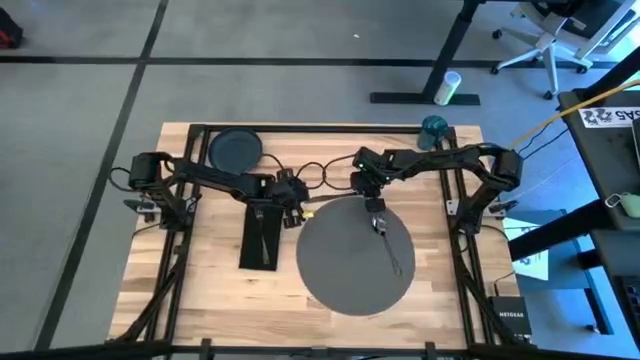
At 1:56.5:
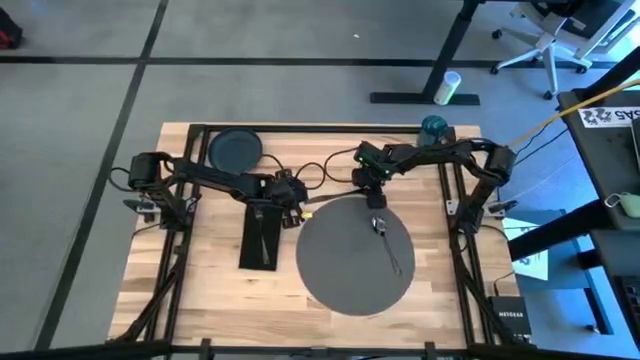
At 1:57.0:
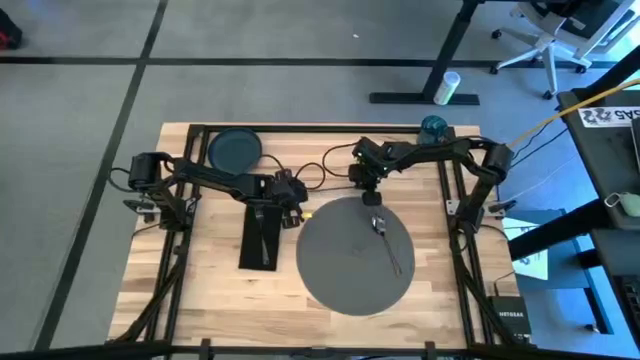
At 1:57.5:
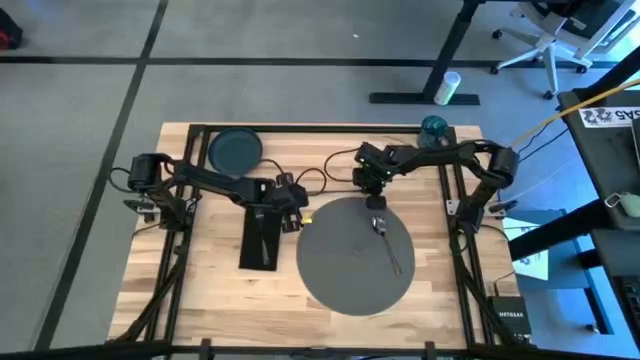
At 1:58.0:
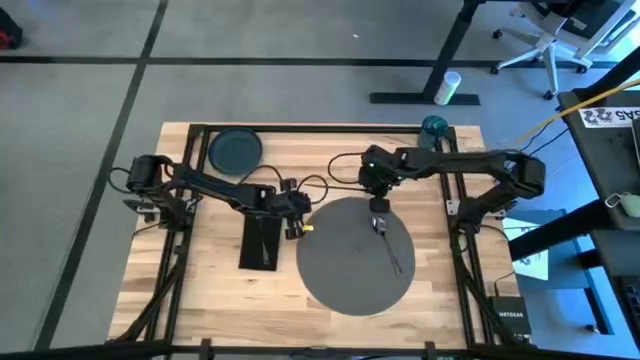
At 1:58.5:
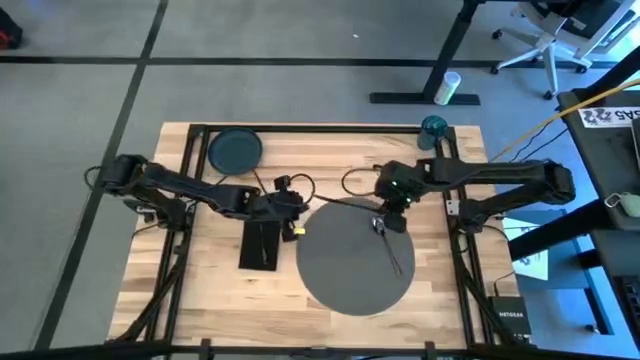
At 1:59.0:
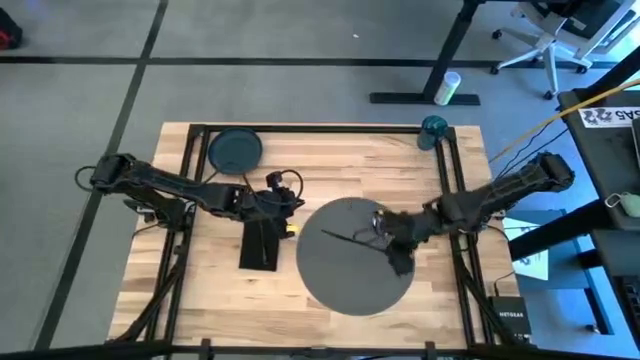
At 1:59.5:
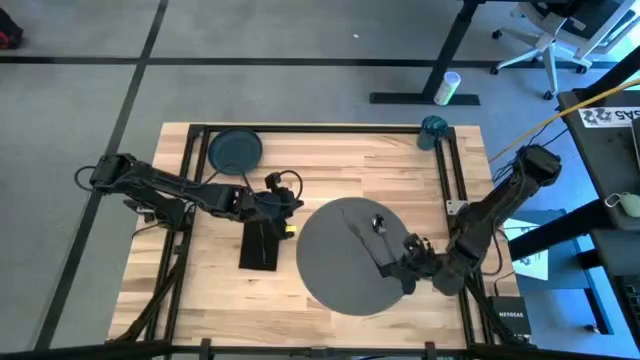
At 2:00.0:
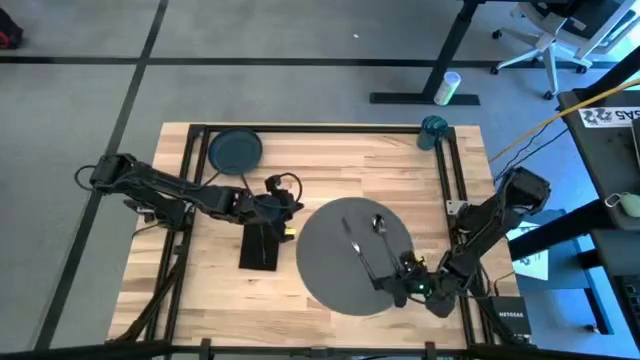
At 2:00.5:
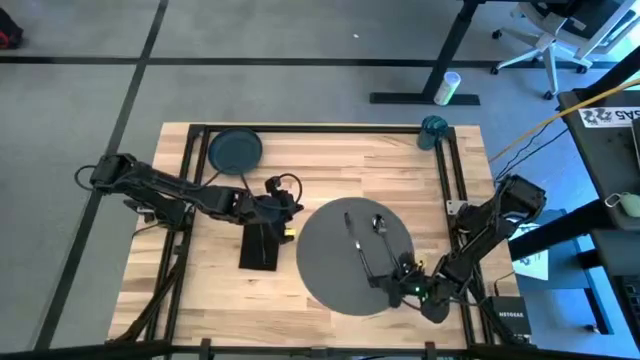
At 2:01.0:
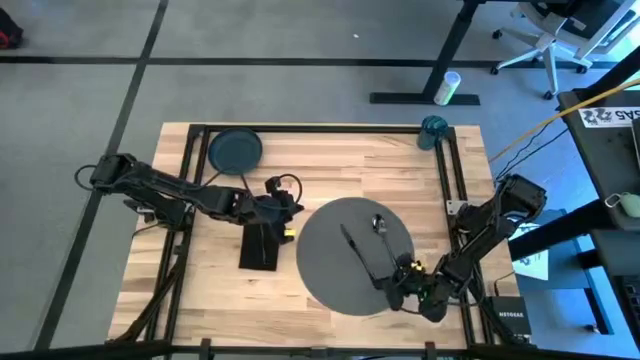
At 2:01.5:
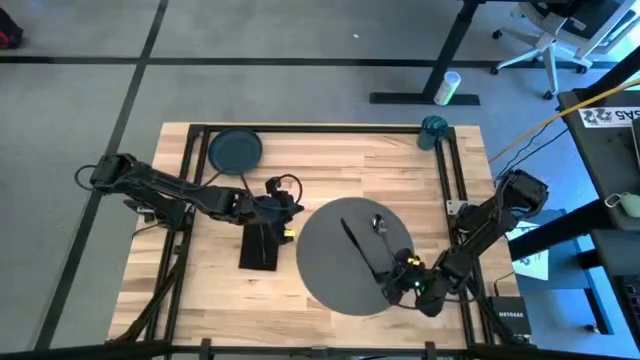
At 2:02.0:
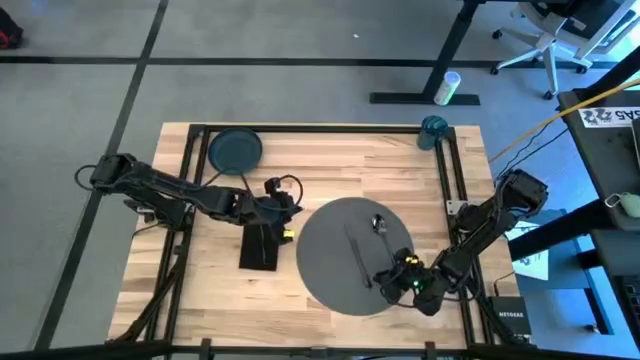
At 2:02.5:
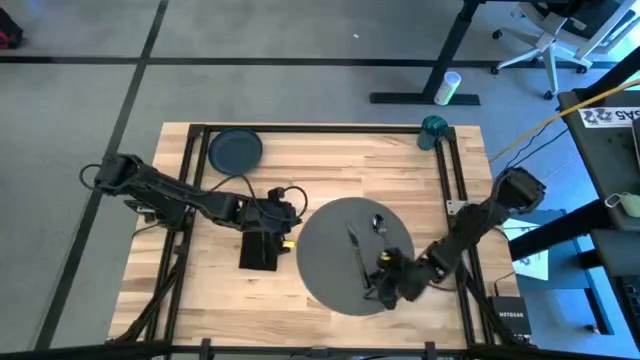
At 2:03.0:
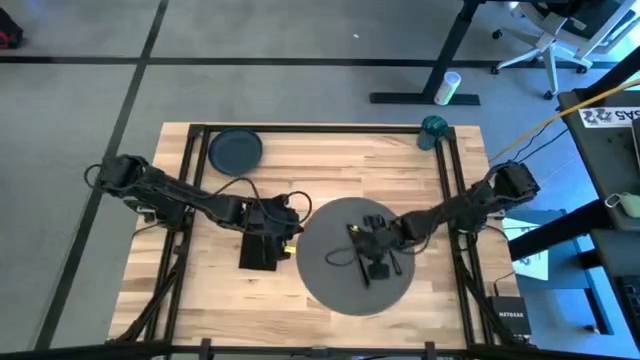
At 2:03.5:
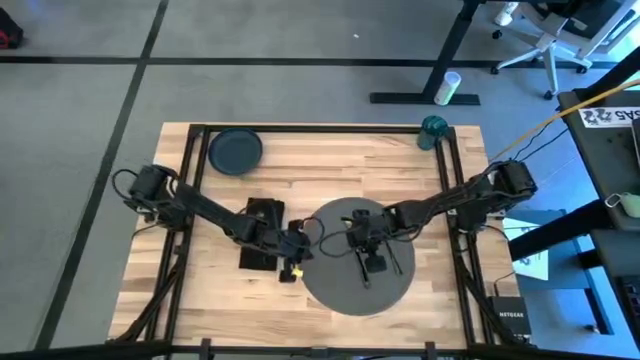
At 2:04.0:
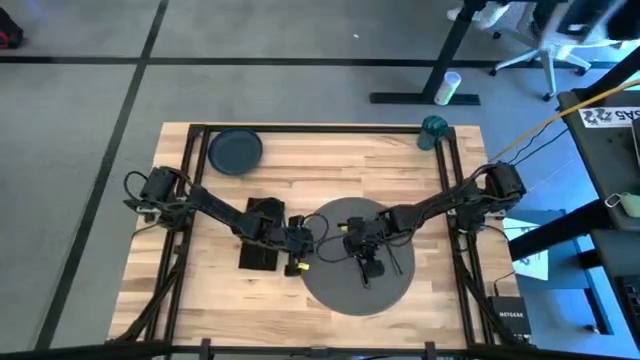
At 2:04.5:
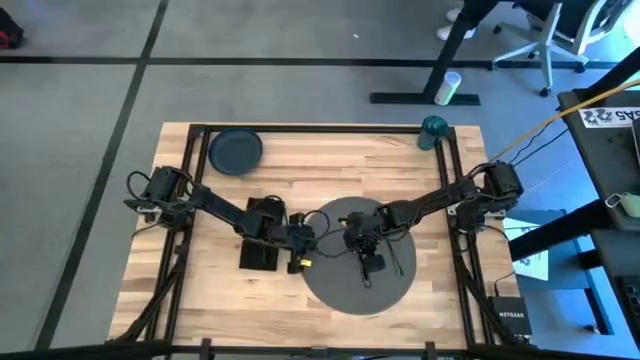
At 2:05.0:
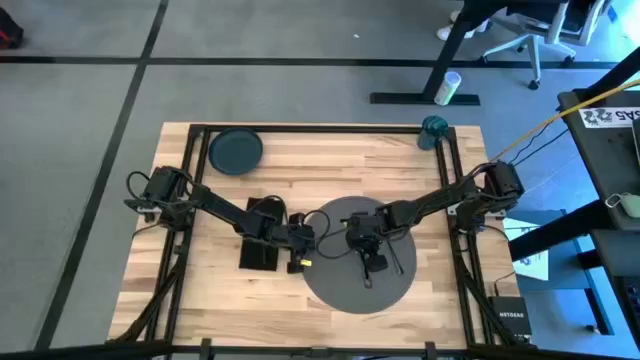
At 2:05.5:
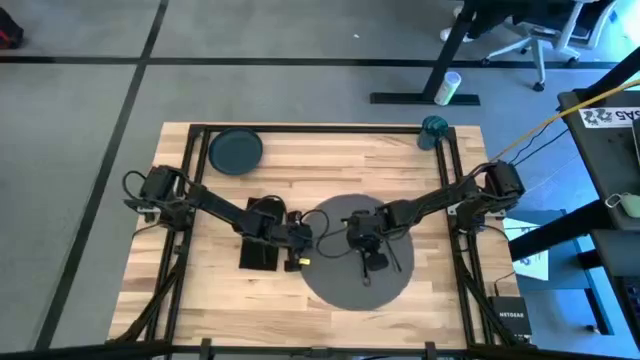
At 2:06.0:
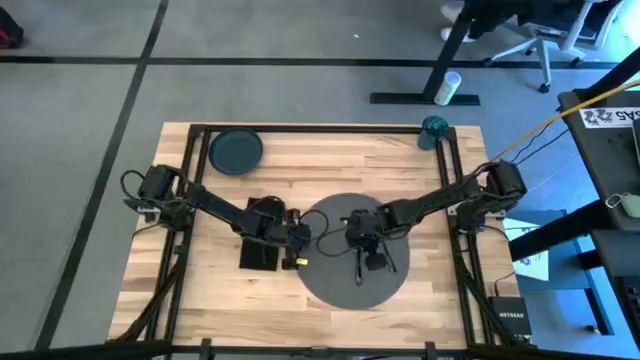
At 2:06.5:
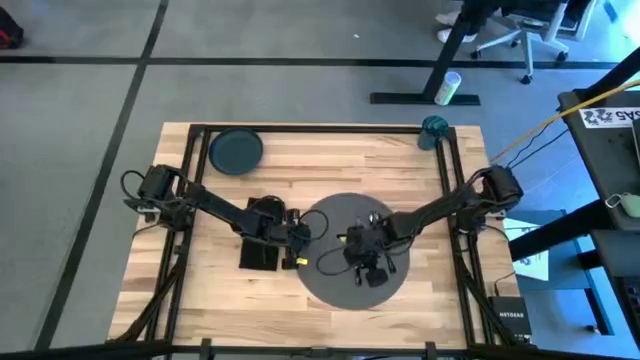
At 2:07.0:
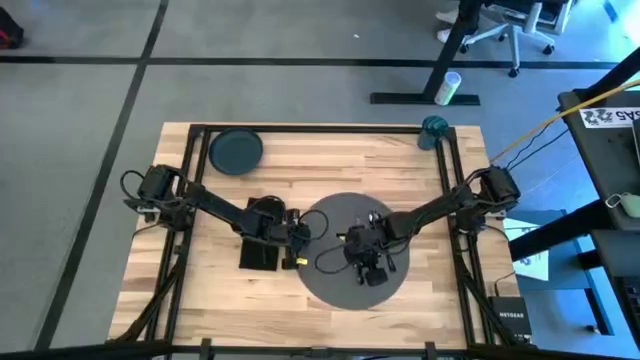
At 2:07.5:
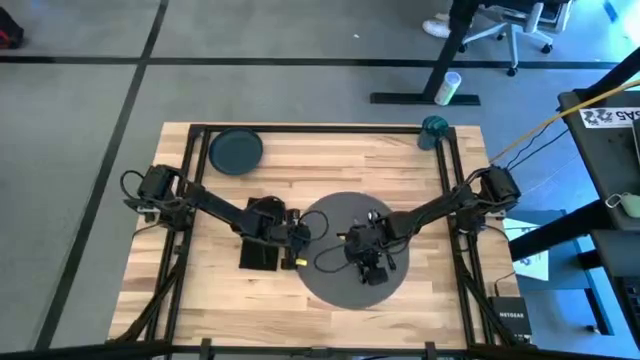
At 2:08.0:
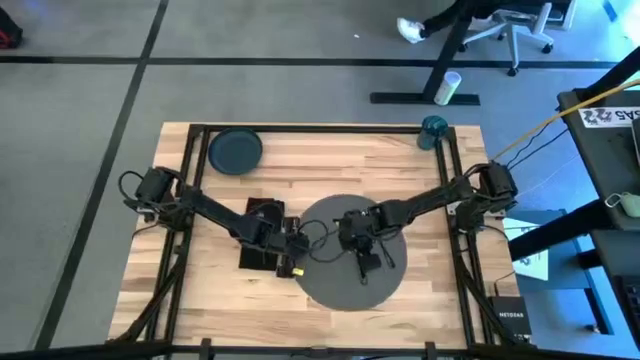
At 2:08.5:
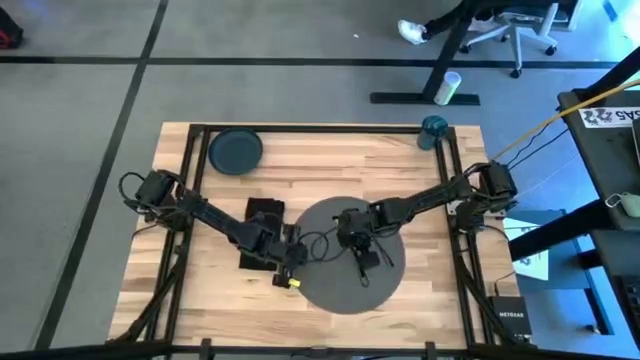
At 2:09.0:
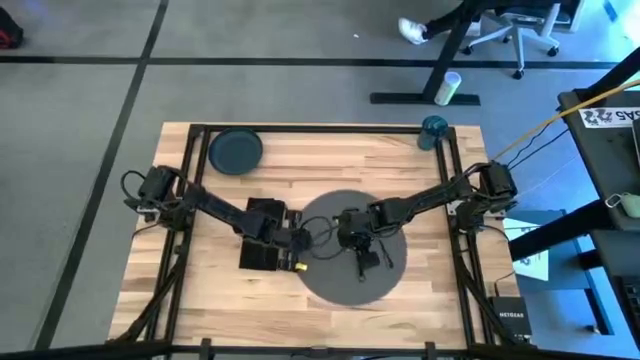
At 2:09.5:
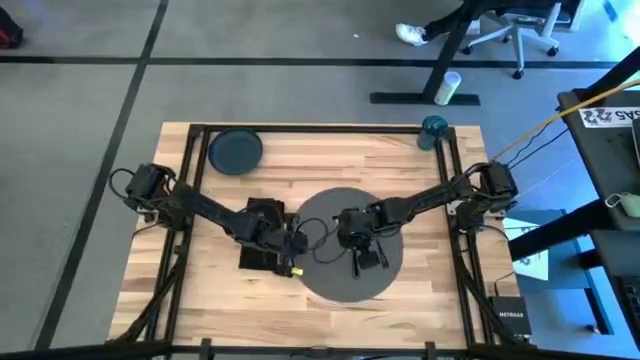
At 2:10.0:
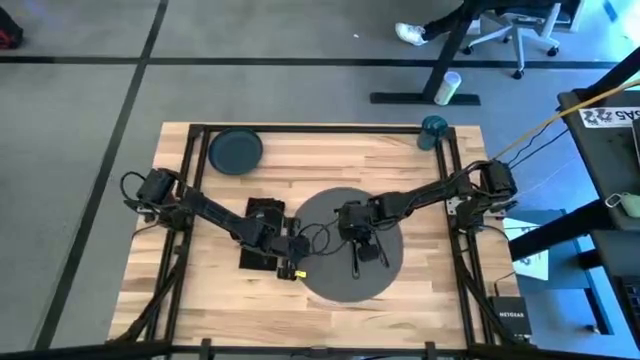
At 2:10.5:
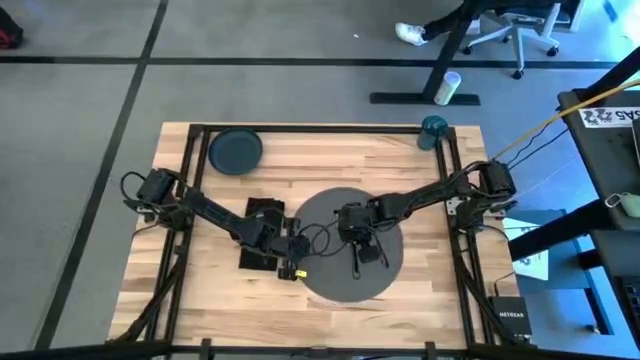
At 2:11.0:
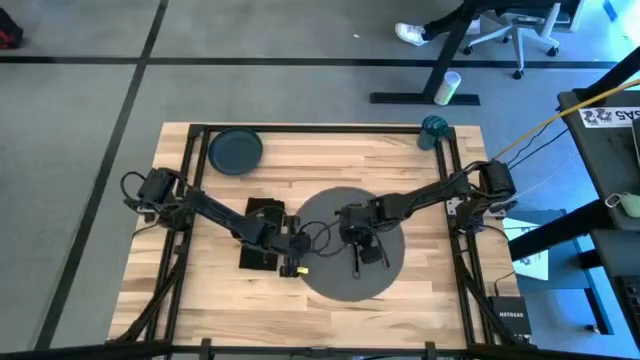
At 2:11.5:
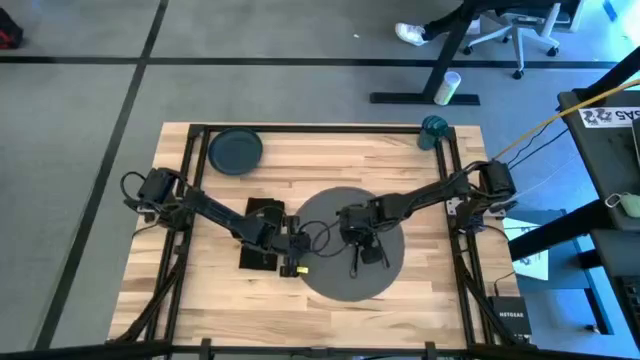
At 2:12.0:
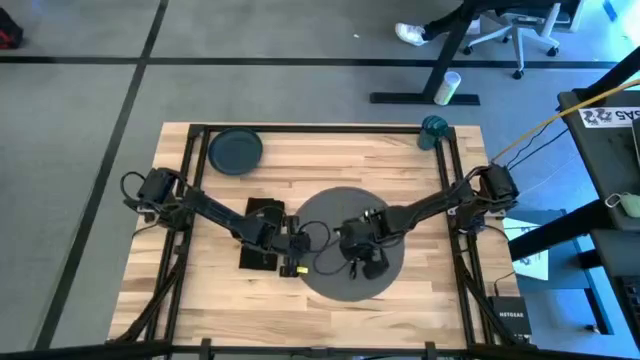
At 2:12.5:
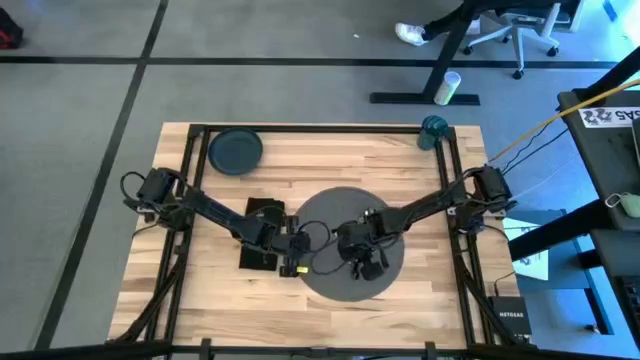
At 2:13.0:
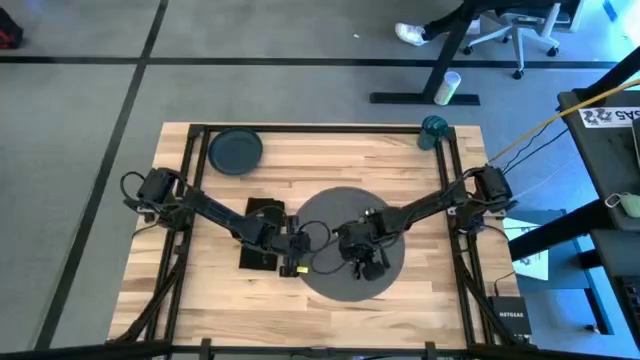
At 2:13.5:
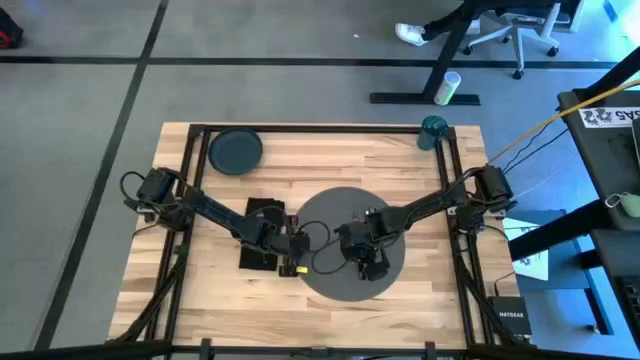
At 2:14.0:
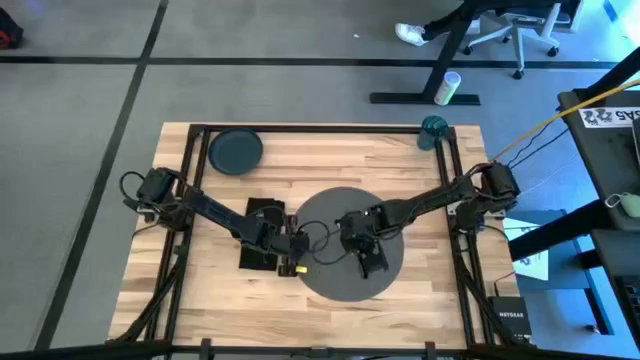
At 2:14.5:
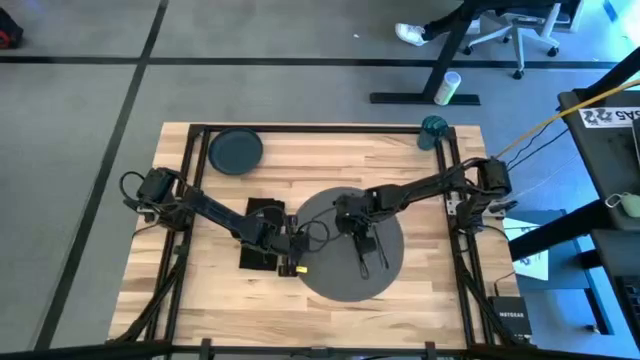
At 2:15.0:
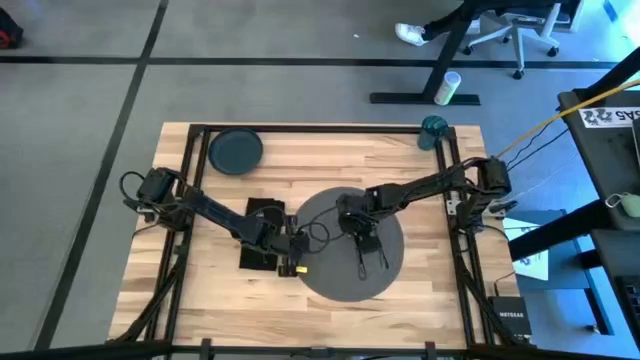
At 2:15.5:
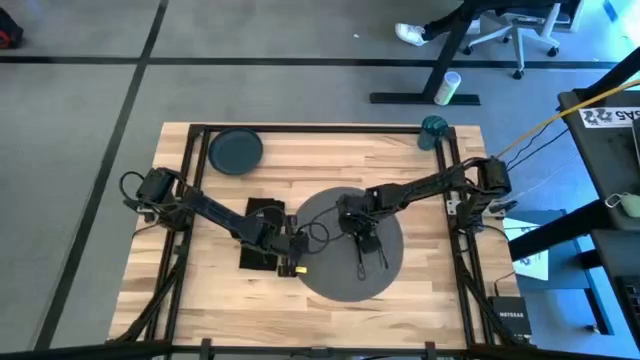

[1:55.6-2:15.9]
Task: Set table place
Put the black knife on the gray table mat
